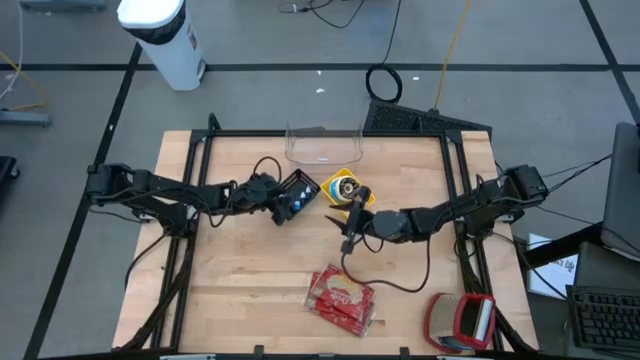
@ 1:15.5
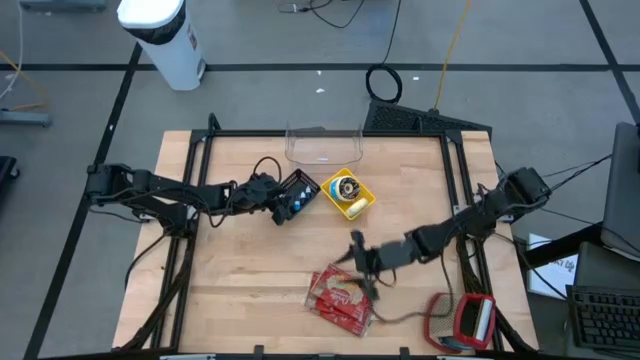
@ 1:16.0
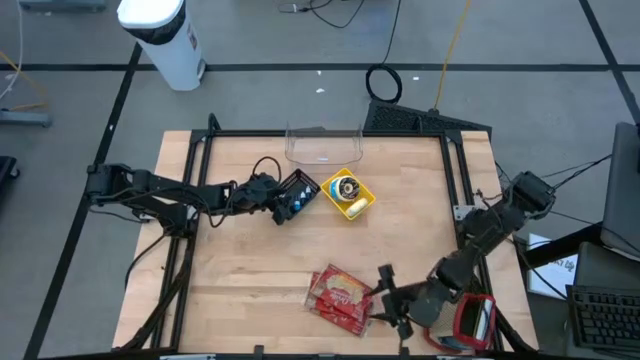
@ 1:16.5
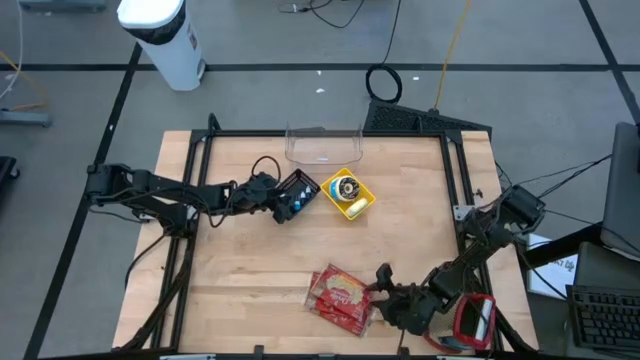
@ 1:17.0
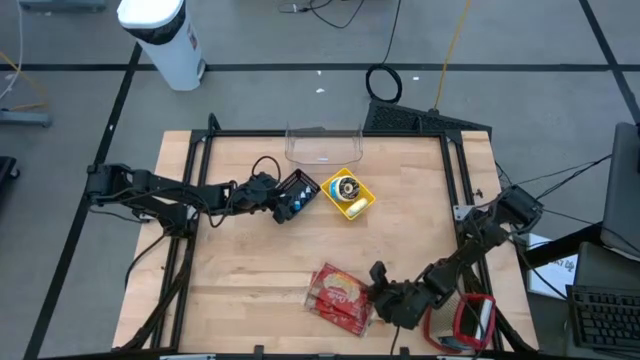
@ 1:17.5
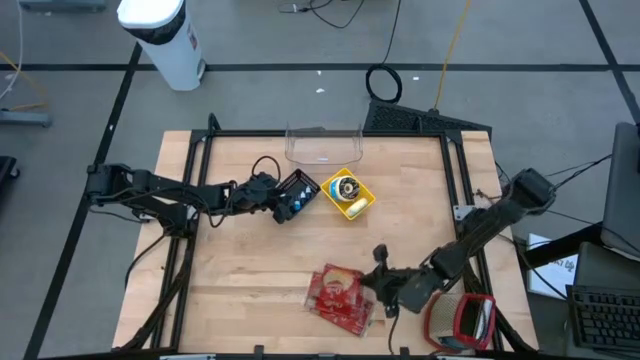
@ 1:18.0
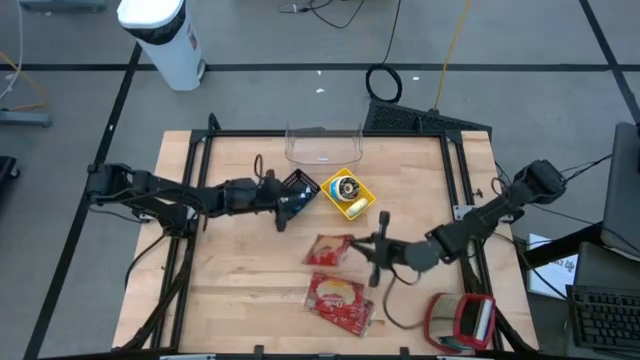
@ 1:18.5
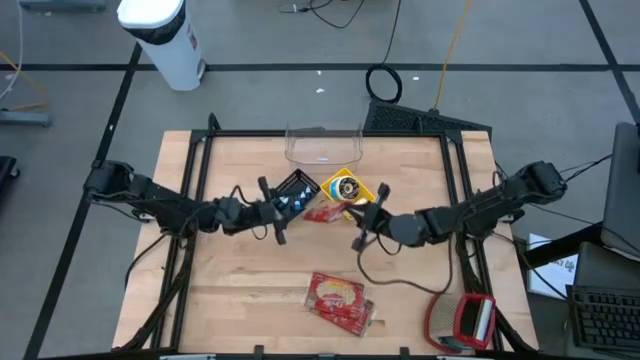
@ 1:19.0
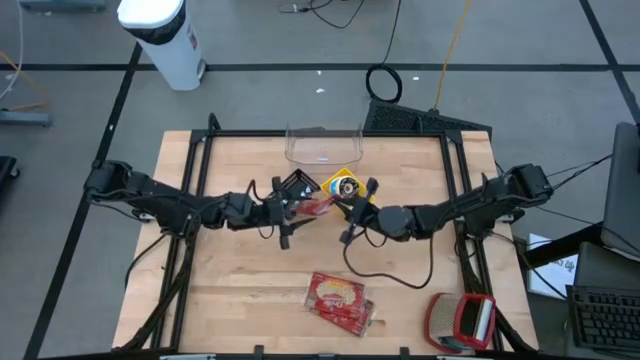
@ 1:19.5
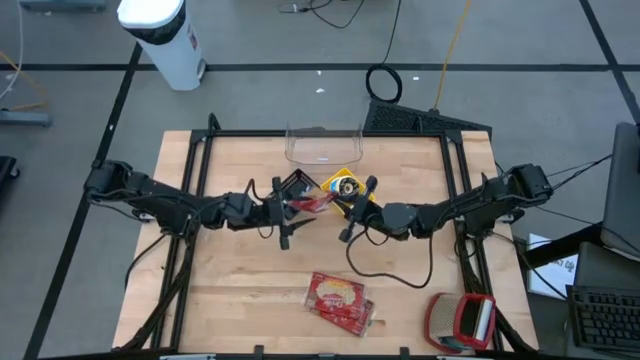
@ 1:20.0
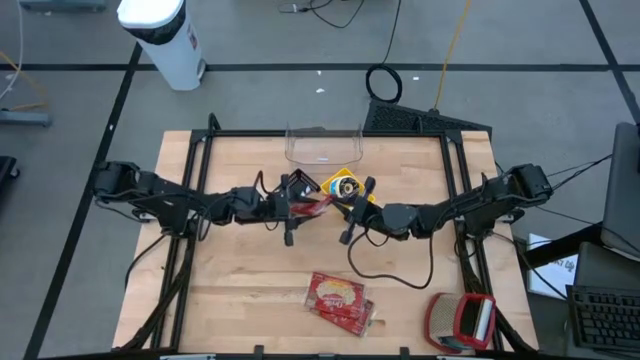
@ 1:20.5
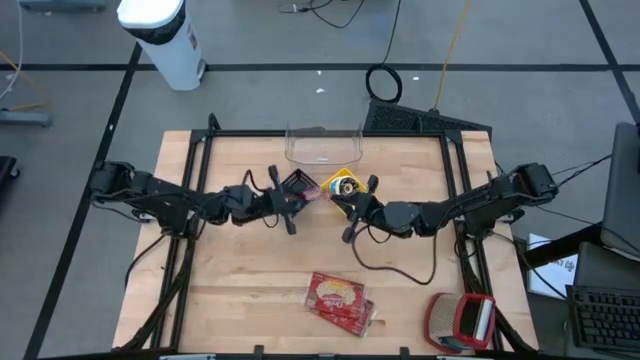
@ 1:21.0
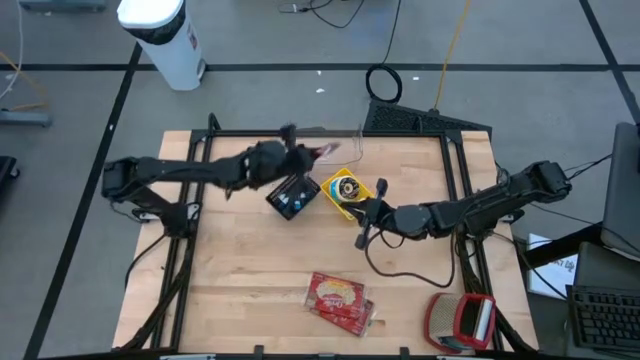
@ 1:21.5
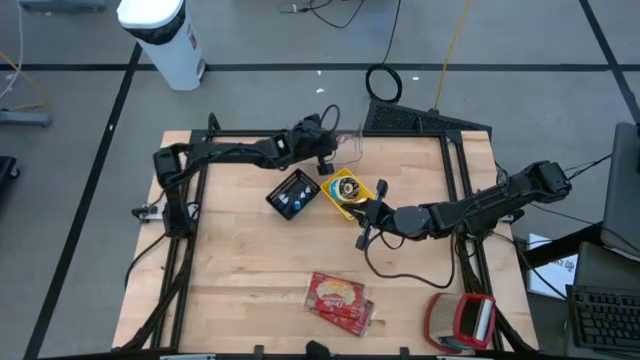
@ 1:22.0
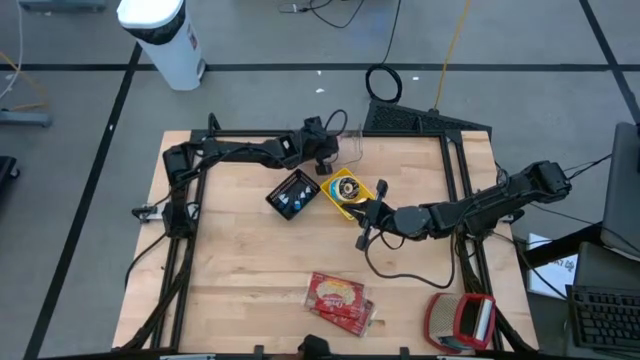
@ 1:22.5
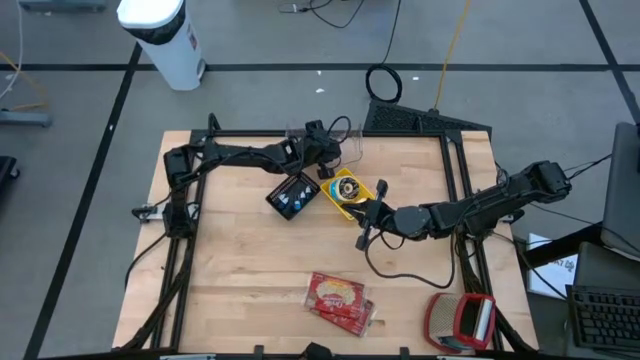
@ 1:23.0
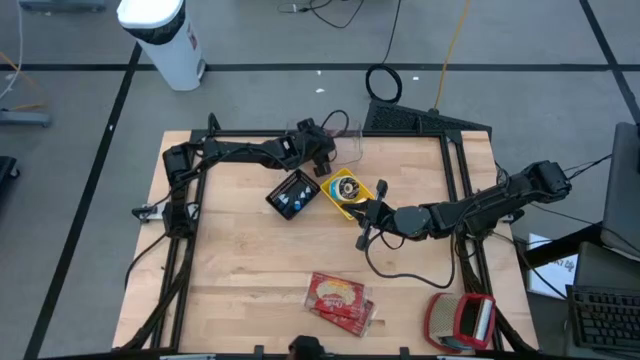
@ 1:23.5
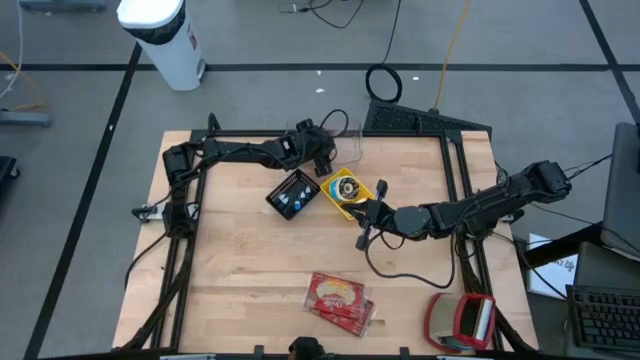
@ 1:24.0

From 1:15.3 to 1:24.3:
Put the top red bag into the transparent bin

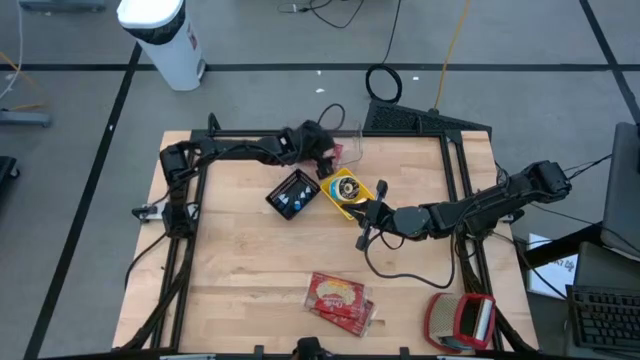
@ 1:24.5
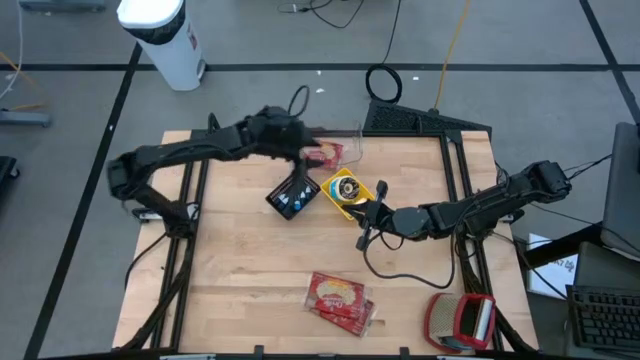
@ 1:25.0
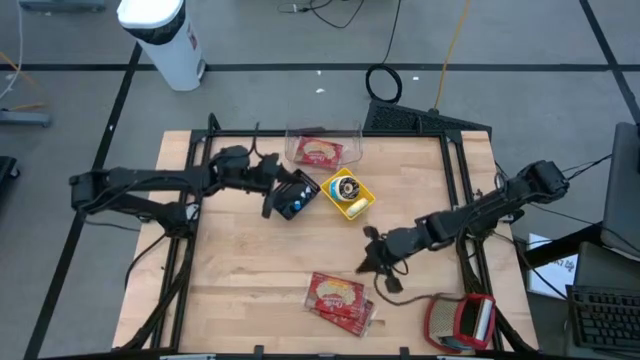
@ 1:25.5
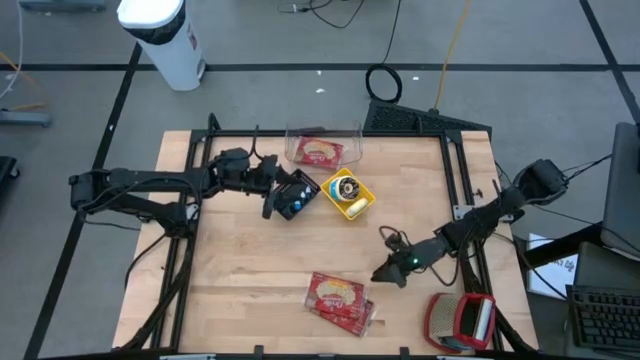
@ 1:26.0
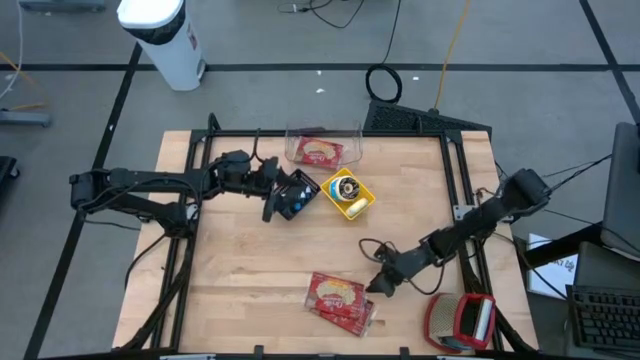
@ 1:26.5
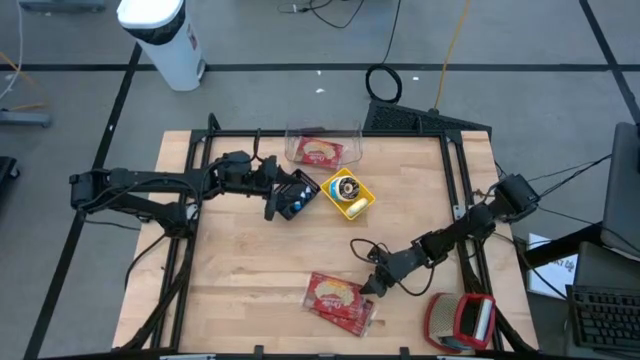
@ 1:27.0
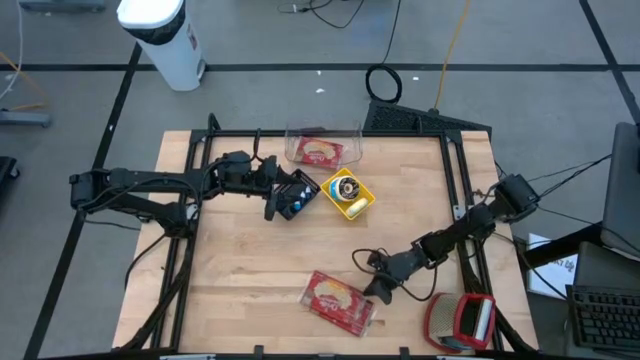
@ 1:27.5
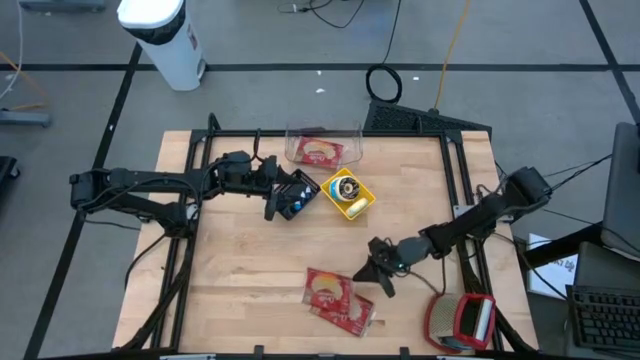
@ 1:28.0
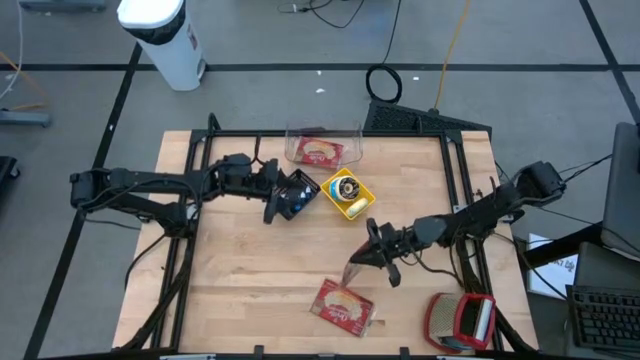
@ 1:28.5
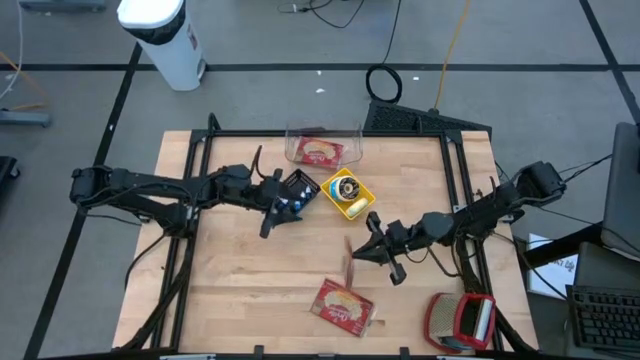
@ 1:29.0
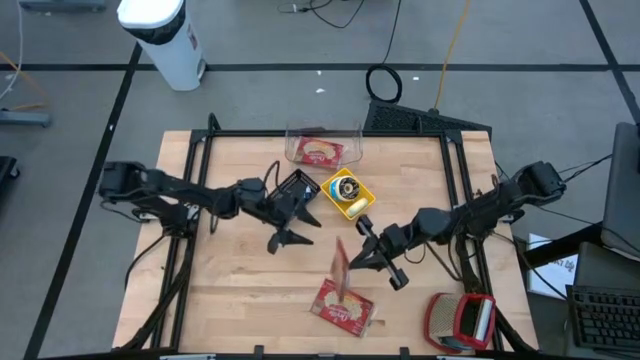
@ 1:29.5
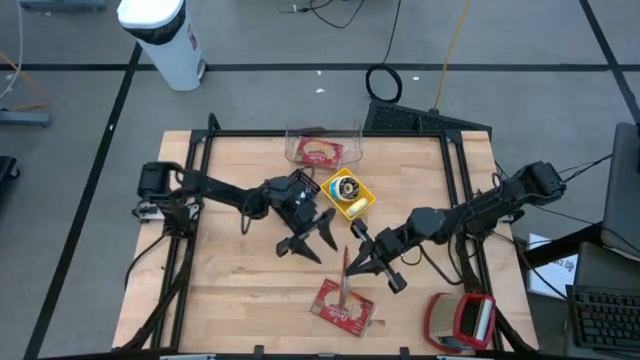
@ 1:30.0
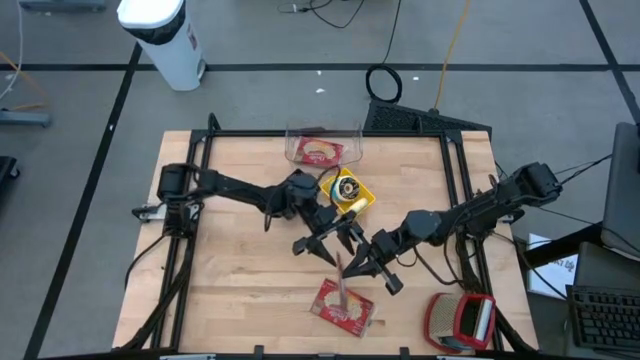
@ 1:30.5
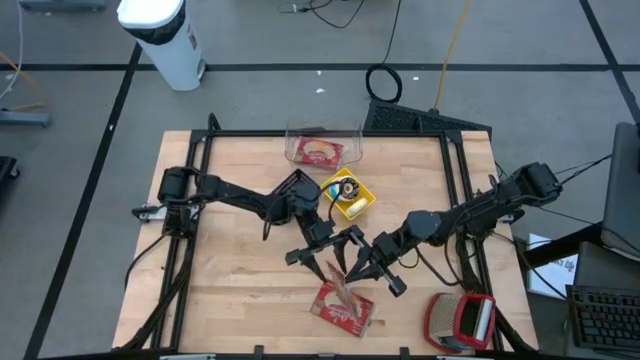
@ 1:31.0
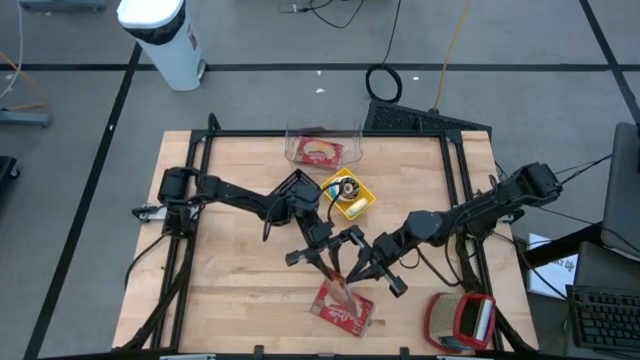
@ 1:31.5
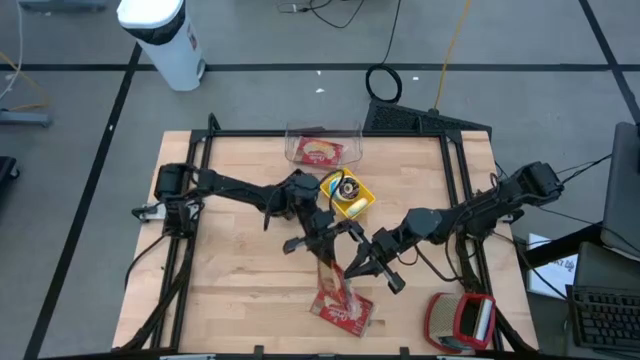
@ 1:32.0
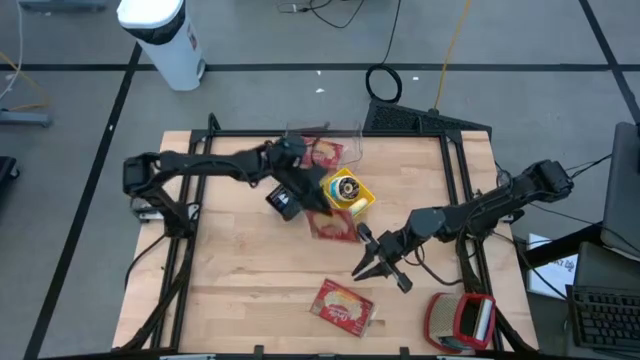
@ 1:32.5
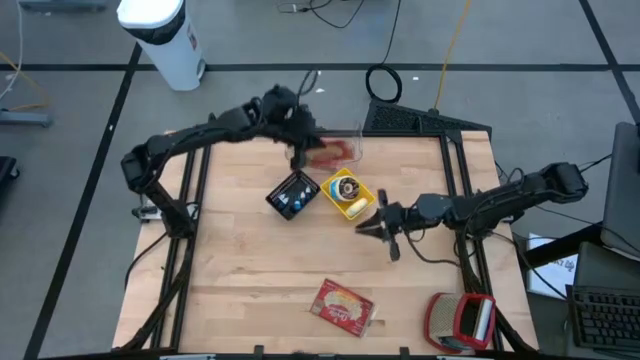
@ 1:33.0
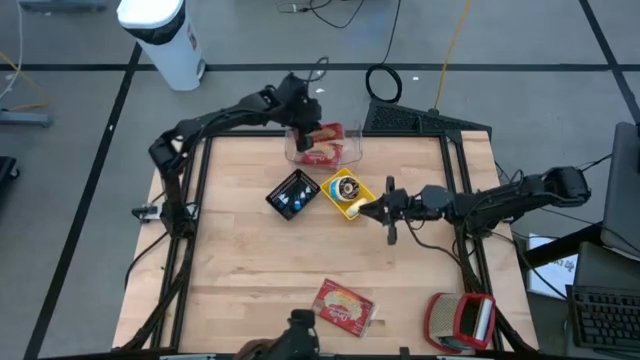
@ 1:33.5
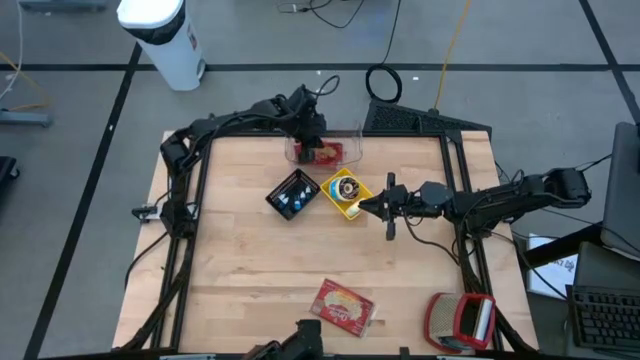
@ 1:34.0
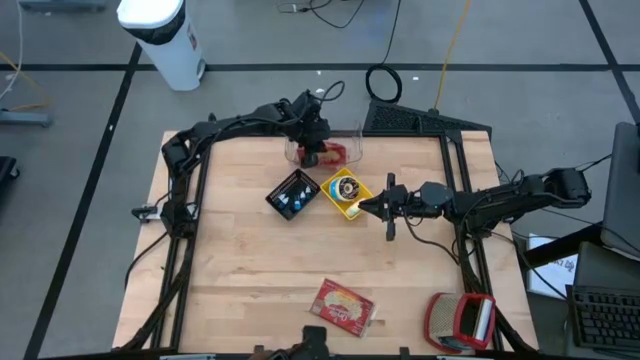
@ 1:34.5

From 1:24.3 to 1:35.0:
Put the top red bag into the transparent bin

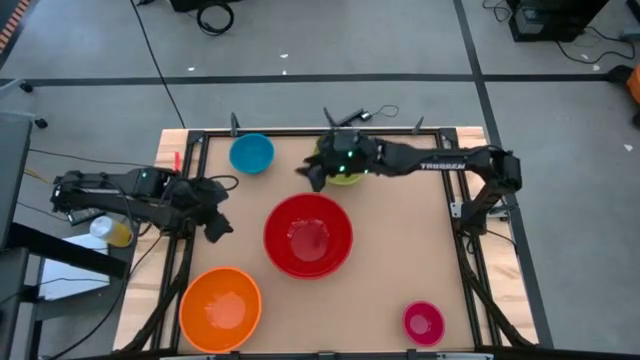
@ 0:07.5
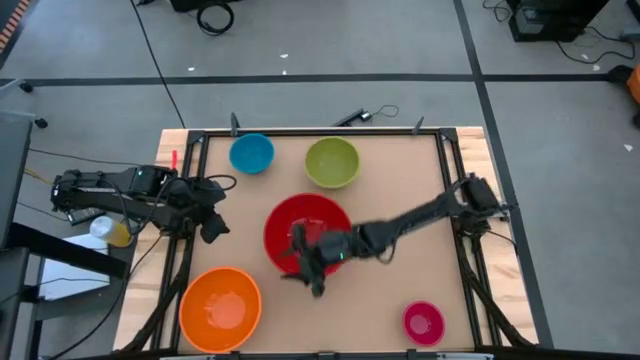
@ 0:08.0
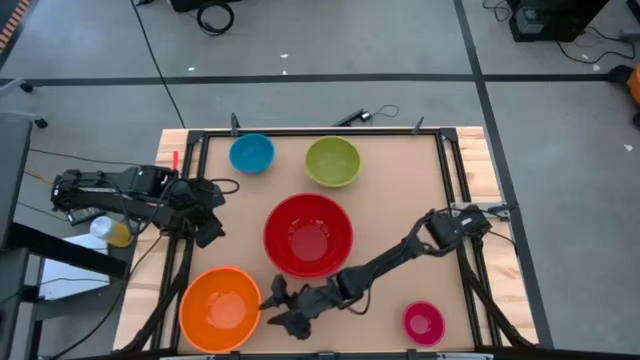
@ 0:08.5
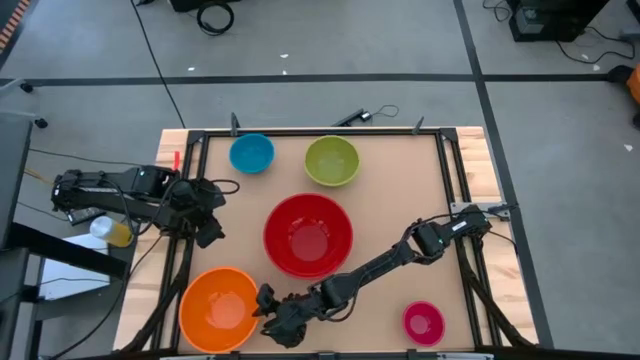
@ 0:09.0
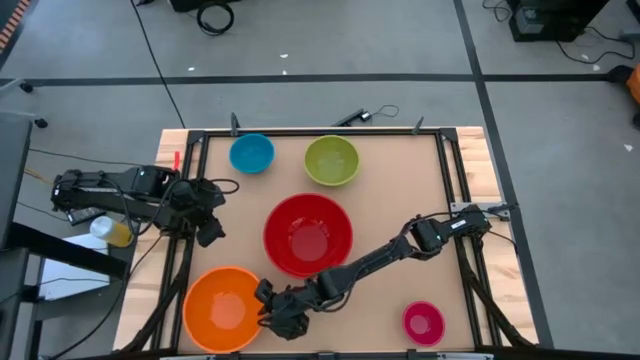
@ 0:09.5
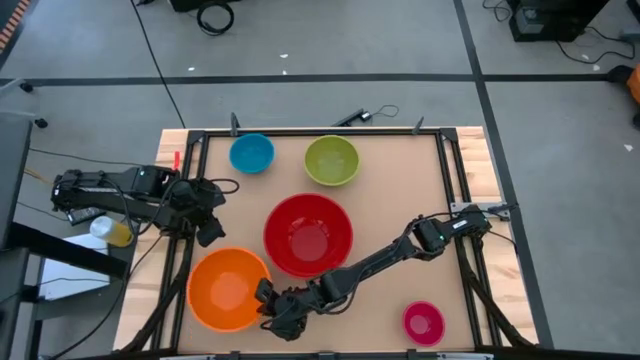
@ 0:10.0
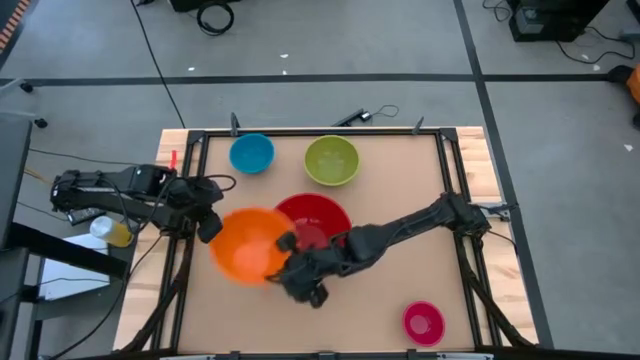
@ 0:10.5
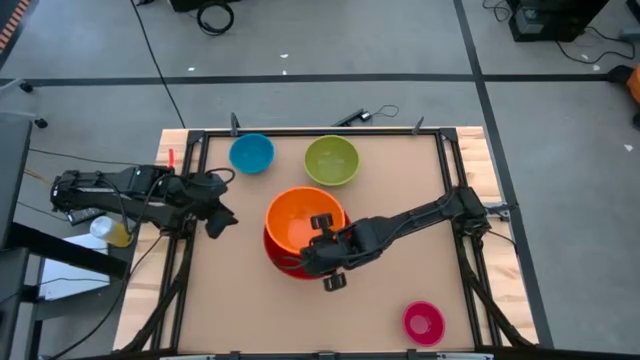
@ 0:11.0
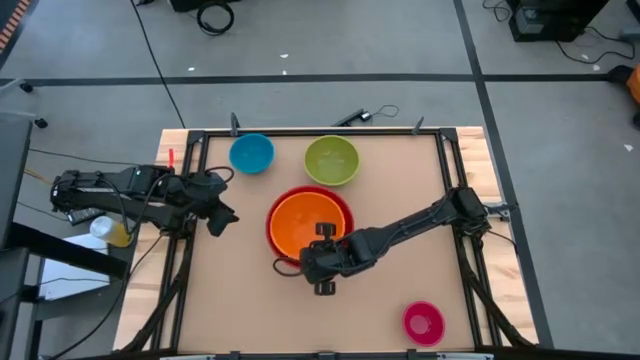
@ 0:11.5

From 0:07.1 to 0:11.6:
Stack the orange bowl into the red bowl
